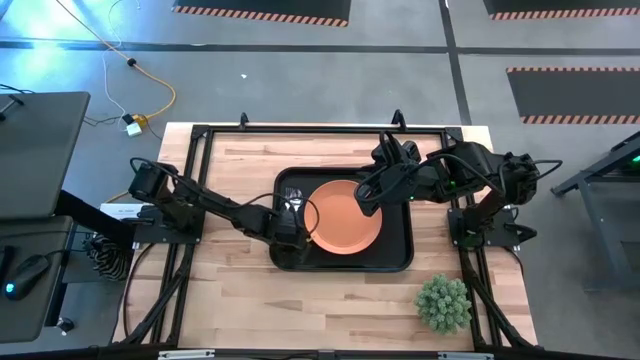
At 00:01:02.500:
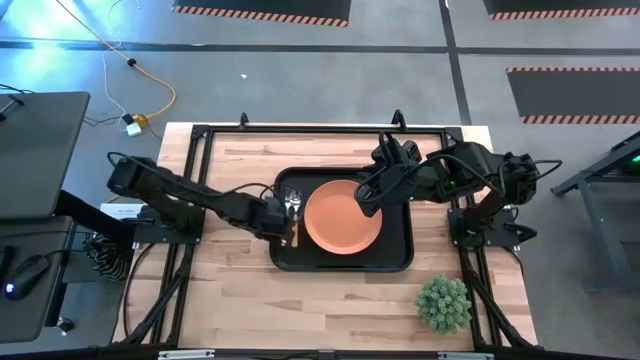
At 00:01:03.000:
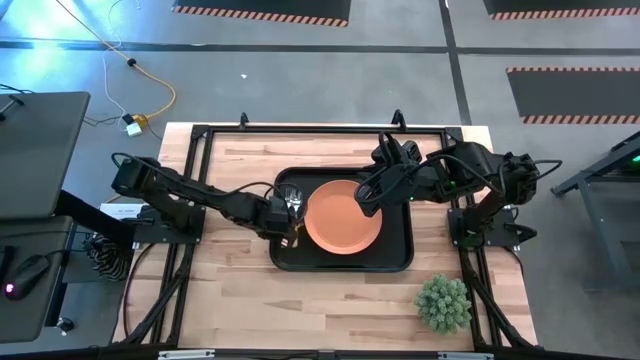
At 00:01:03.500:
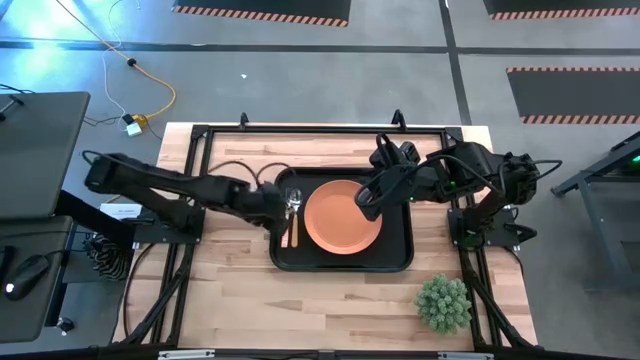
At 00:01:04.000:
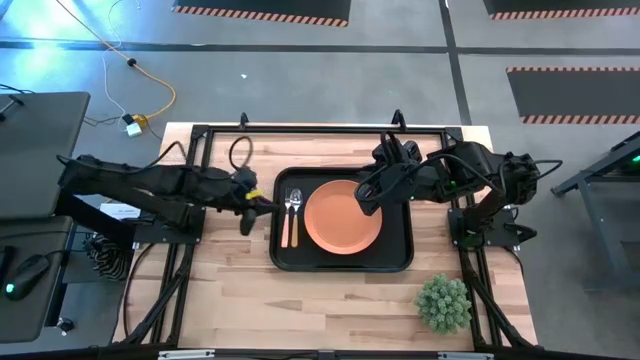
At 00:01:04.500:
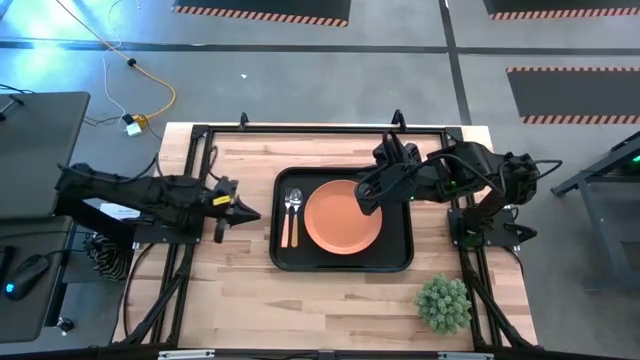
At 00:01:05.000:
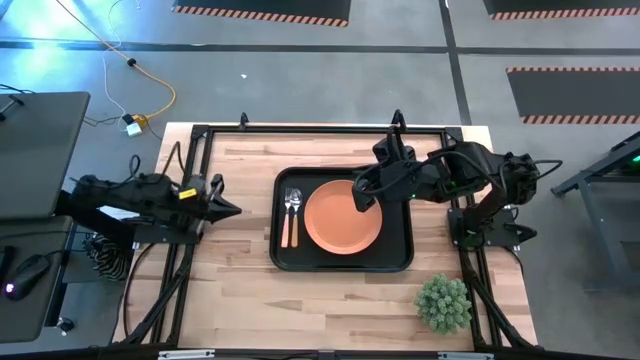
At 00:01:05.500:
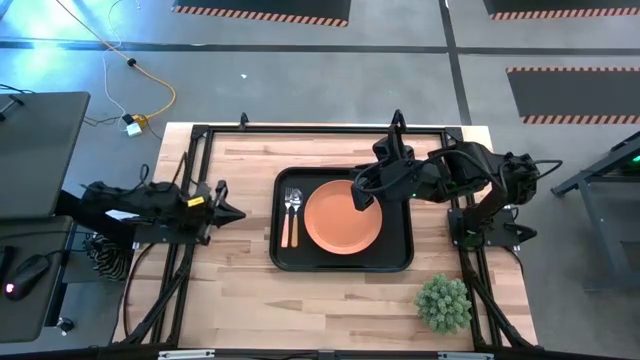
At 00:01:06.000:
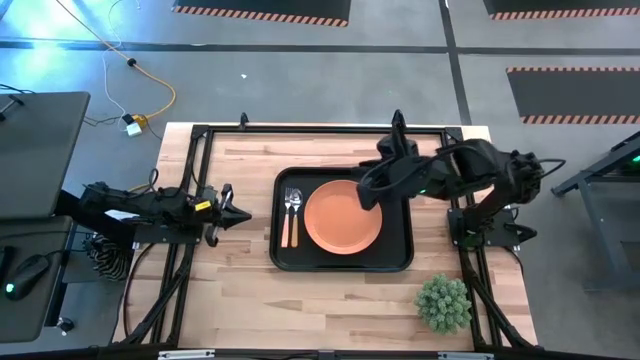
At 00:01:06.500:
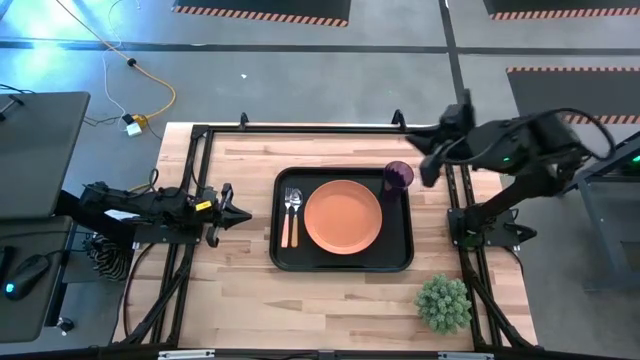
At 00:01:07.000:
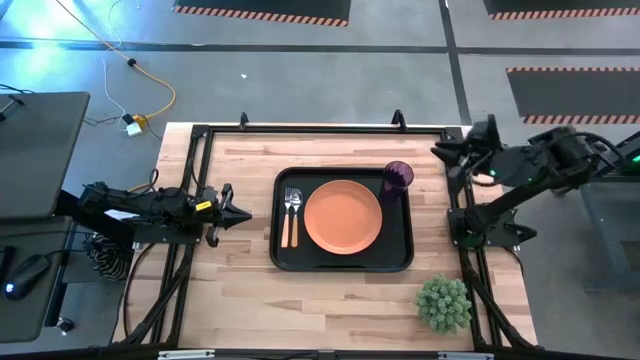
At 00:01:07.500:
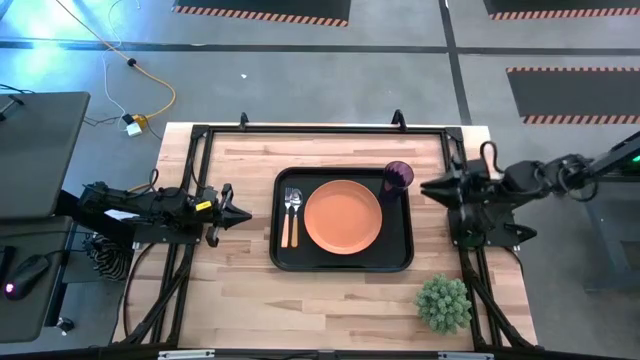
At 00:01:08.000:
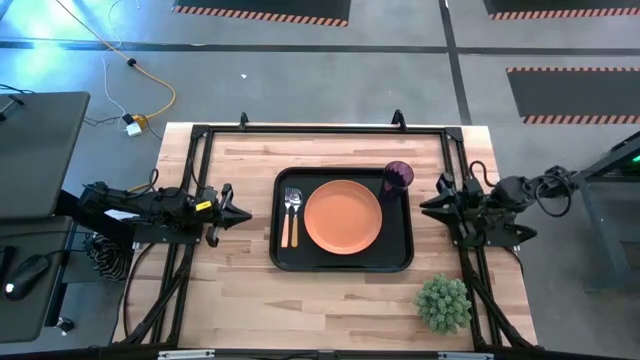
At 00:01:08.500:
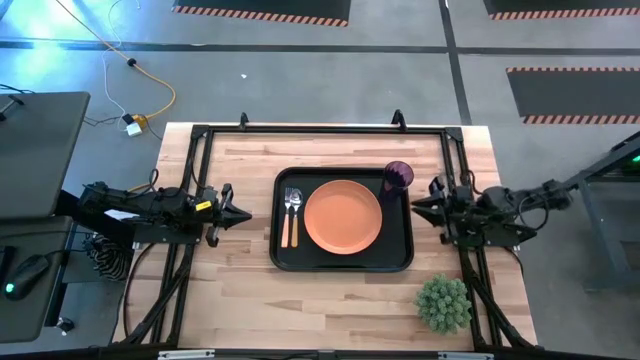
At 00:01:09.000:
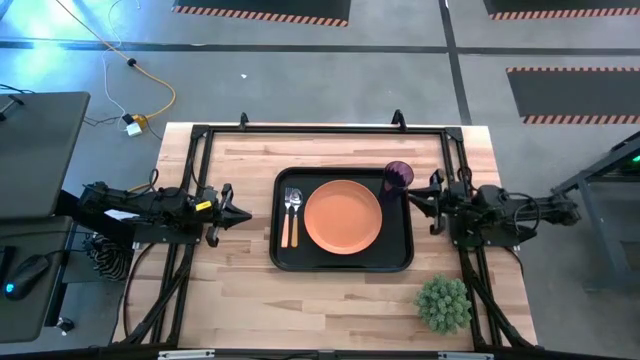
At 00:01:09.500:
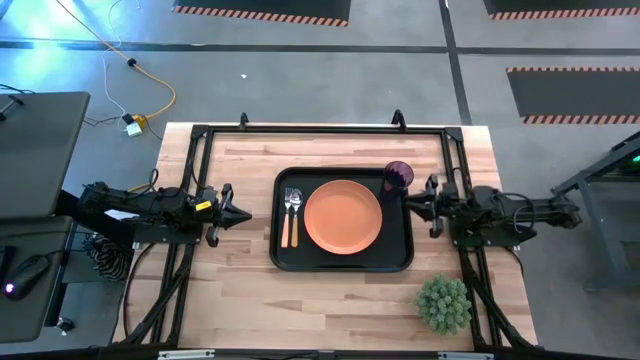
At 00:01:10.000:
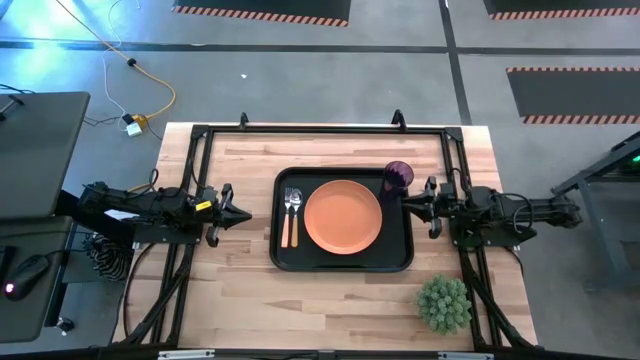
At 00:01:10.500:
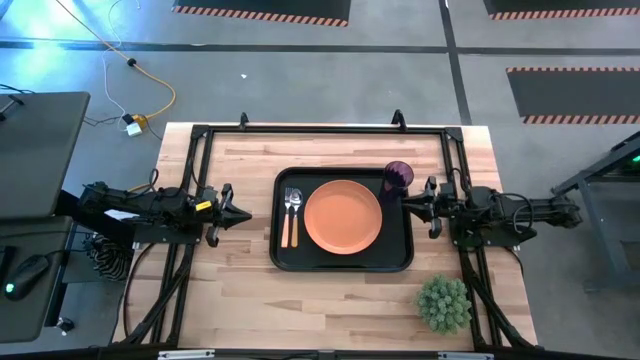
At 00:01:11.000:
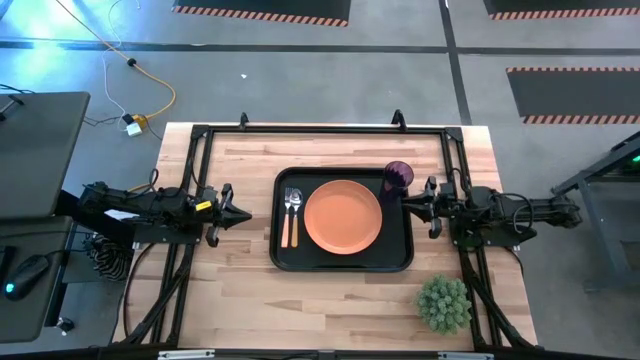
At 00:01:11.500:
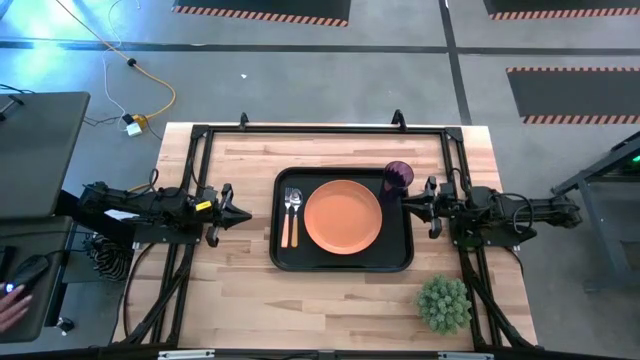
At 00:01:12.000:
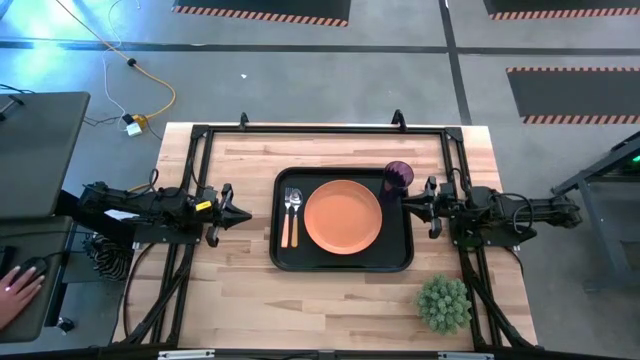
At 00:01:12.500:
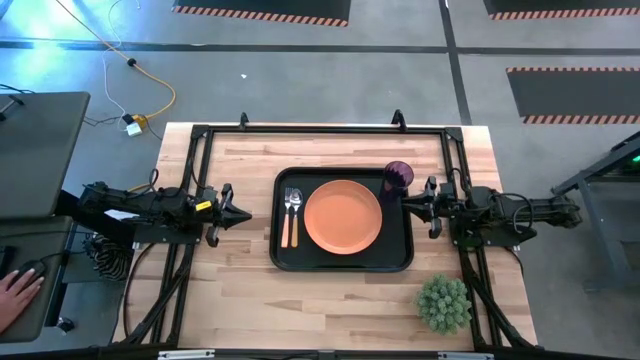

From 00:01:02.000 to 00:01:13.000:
Task: Pick and place plate/cup/fork/spoon on tray
Return to Home Position

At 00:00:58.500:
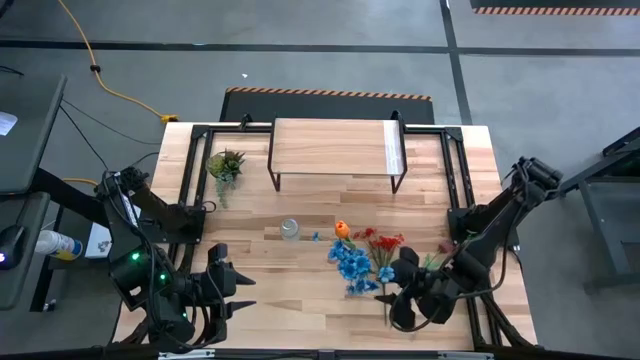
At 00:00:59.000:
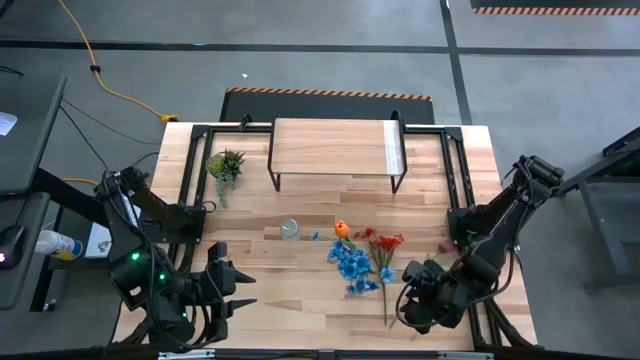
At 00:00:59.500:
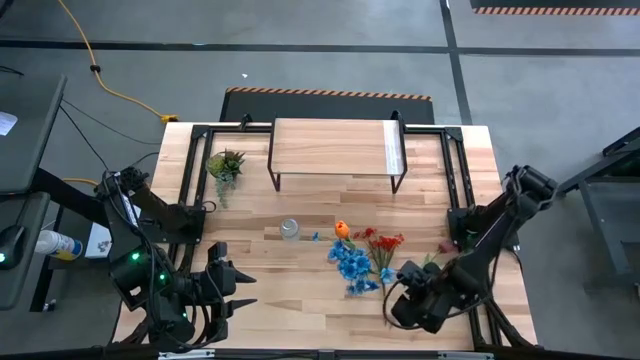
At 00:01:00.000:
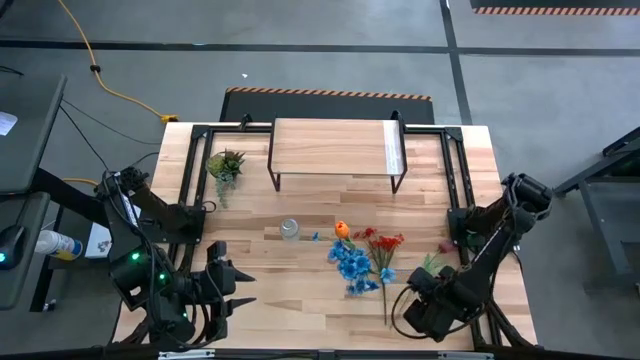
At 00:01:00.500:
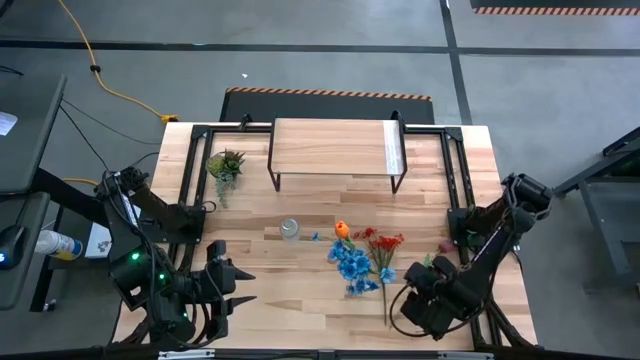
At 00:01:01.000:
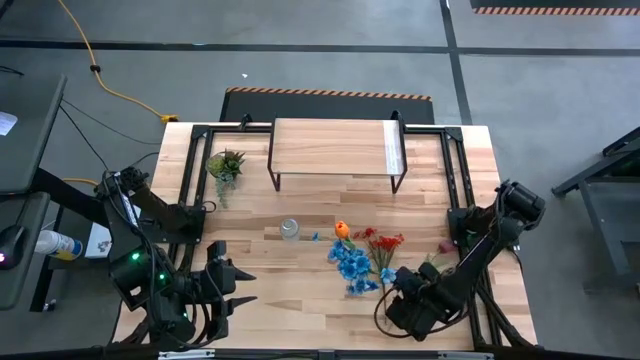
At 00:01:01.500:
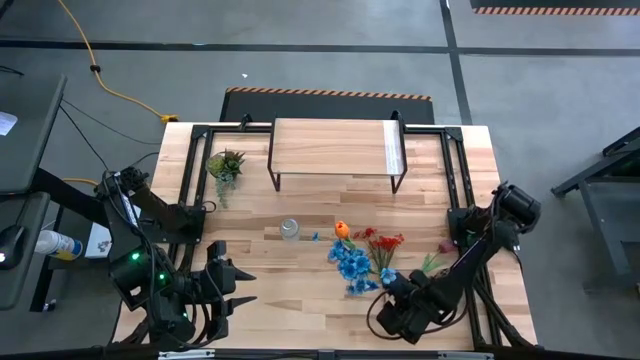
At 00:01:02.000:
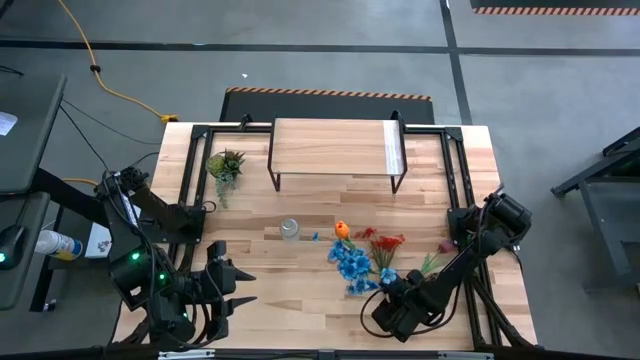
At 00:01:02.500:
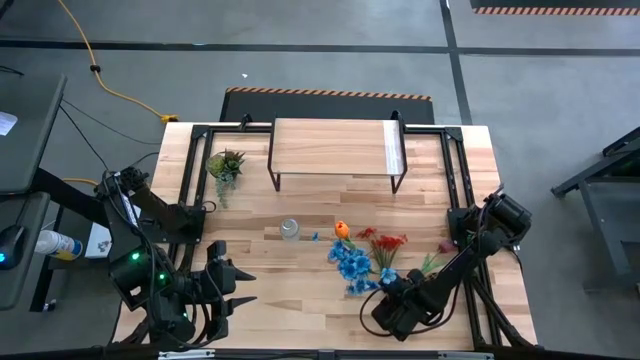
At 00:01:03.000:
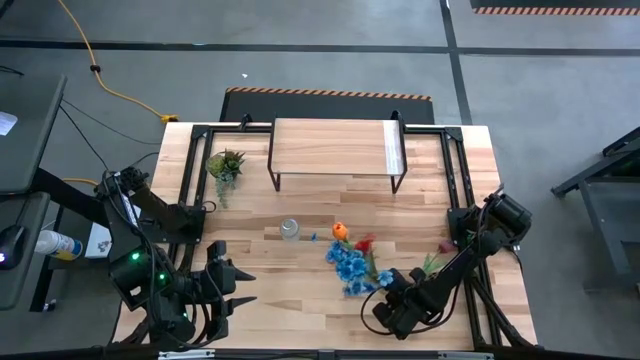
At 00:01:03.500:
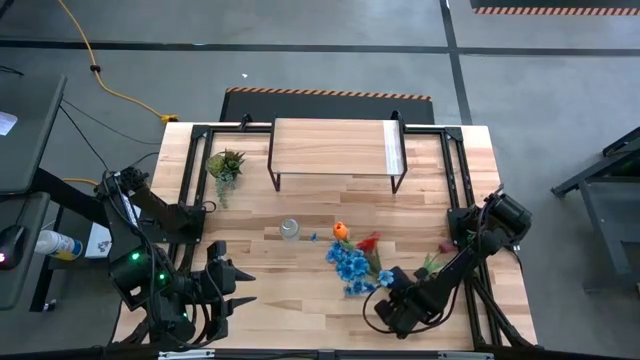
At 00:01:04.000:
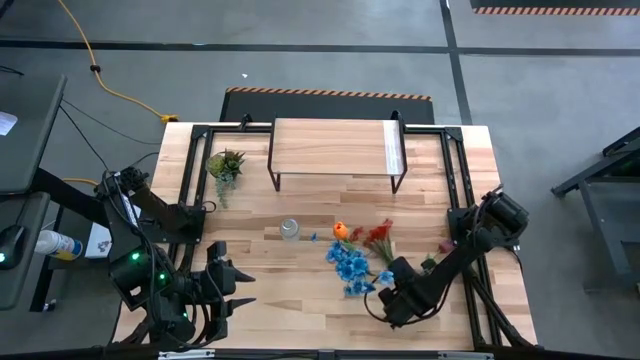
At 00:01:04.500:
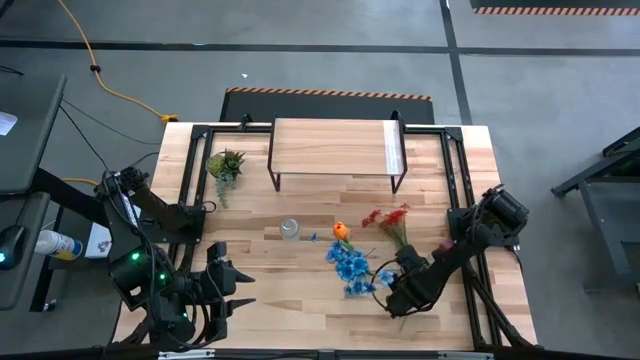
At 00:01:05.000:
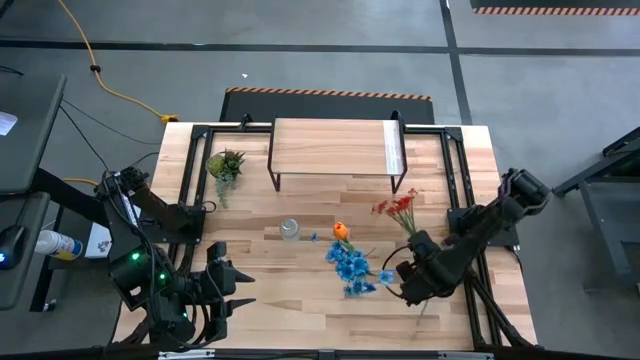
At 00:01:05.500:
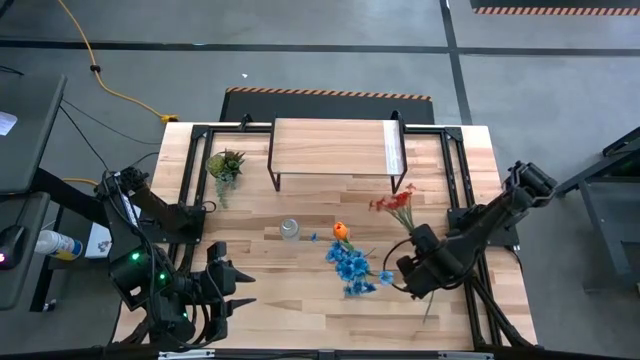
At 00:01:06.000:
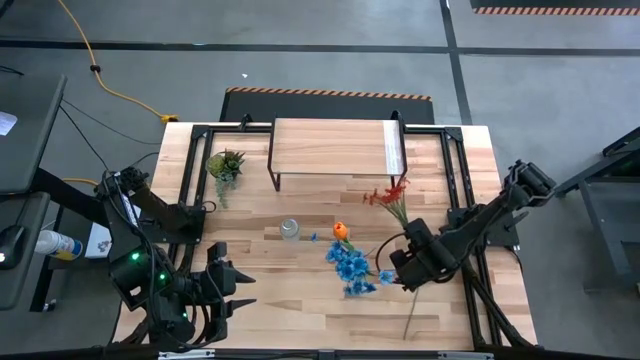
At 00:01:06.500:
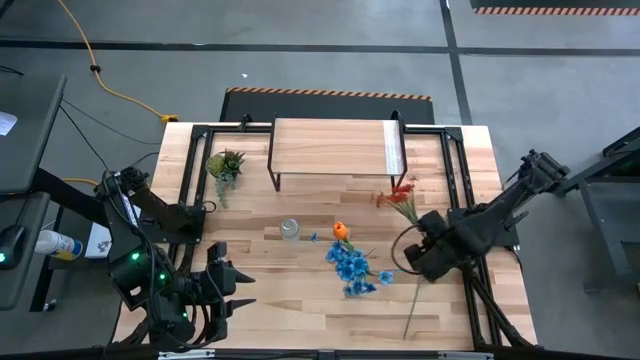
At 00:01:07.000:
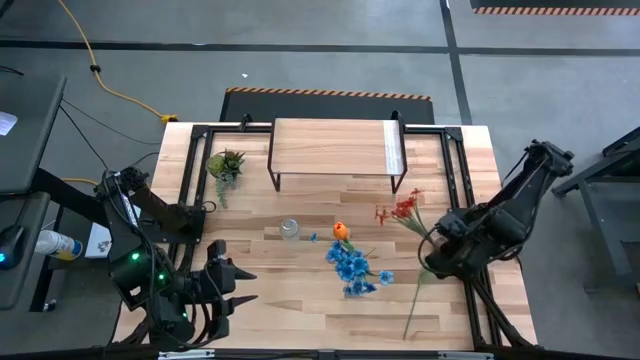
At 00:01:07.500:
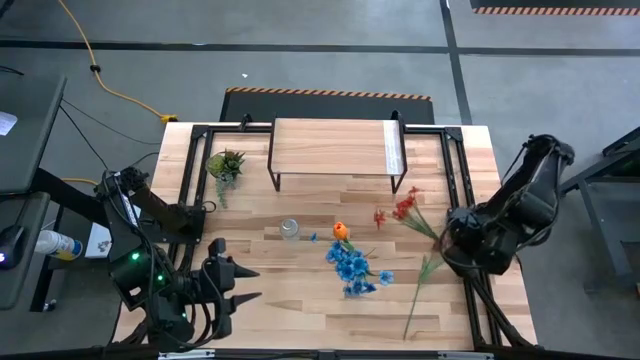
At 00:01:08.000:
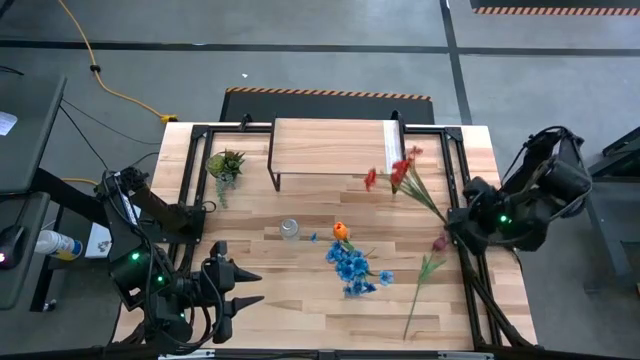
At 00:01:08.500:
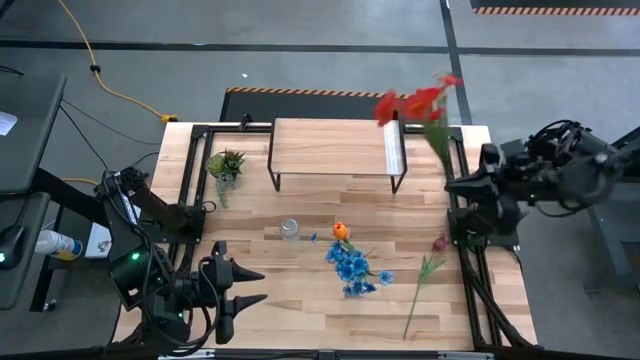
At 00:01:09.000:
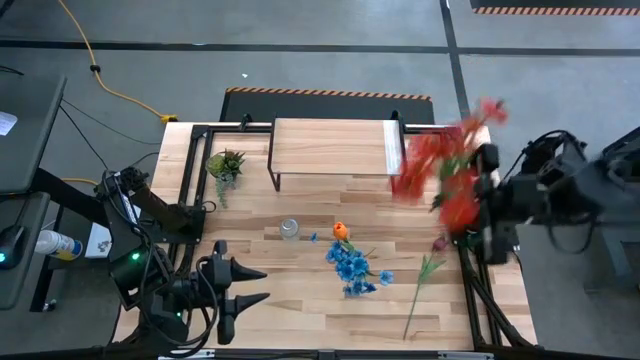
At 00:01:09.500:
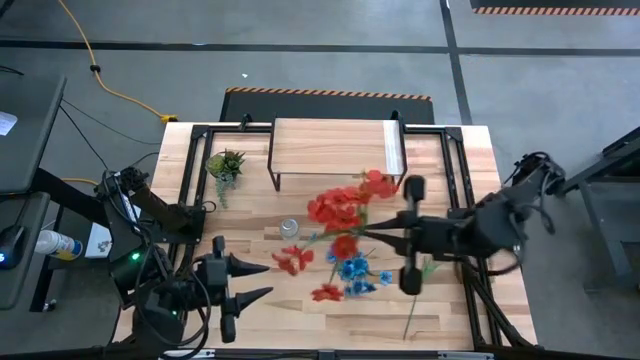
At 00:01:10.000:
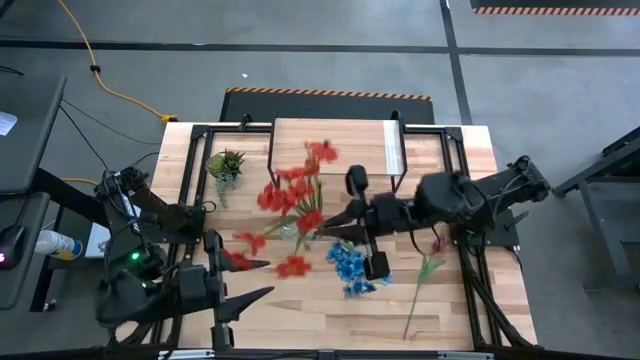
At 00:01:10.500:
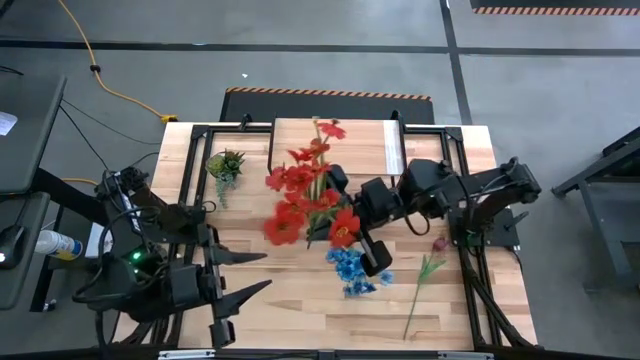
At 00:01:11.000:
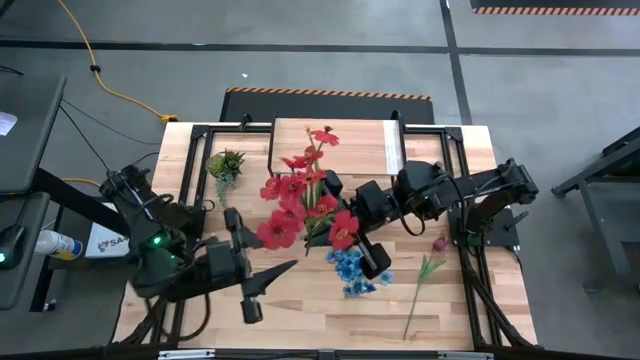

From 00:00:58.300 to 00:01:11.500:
Task: Pick and place flowers into a vace then onto a shelf
Put the red flowers into the left transparent vase
